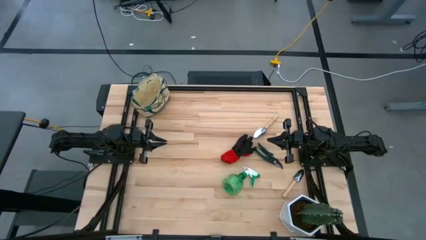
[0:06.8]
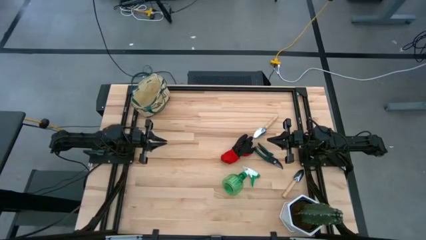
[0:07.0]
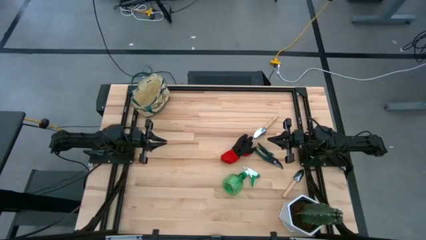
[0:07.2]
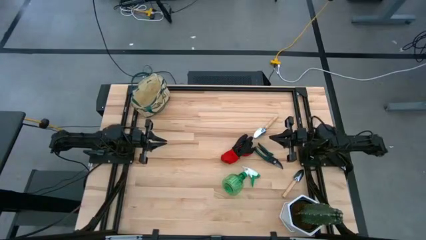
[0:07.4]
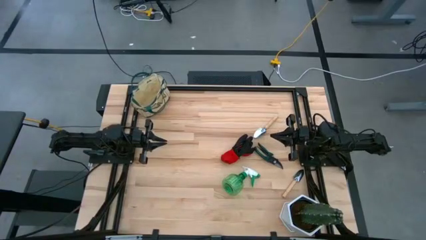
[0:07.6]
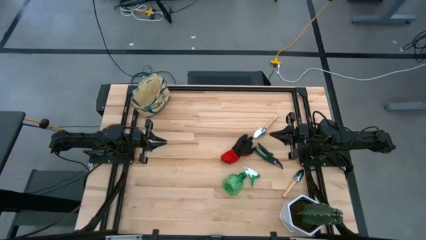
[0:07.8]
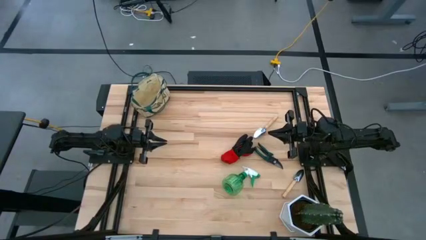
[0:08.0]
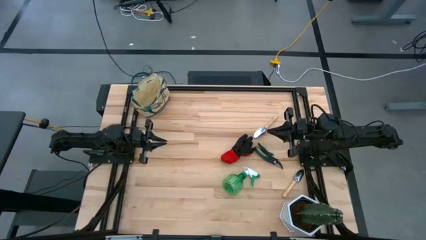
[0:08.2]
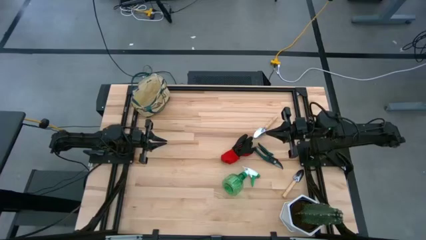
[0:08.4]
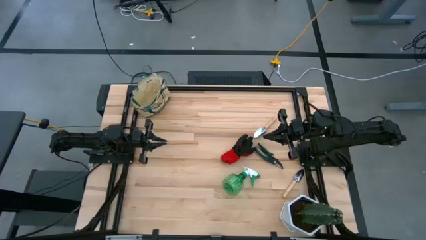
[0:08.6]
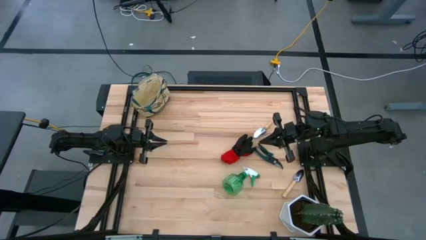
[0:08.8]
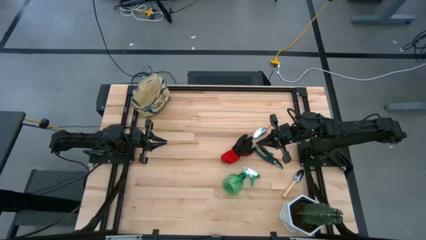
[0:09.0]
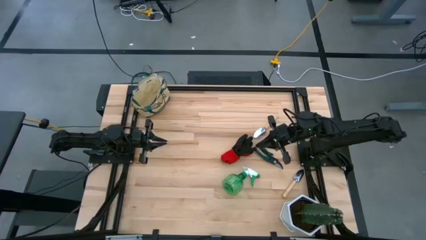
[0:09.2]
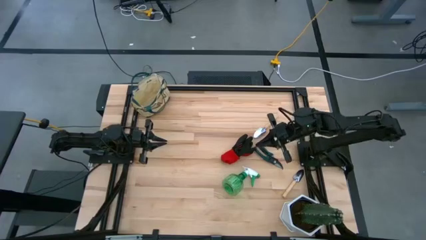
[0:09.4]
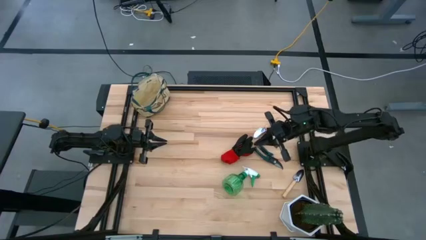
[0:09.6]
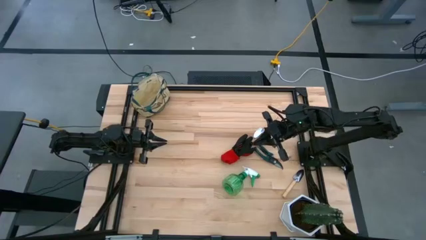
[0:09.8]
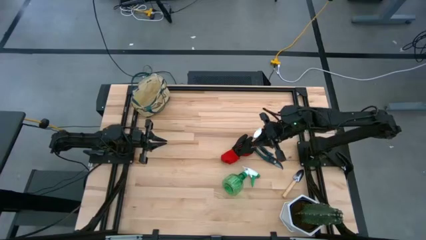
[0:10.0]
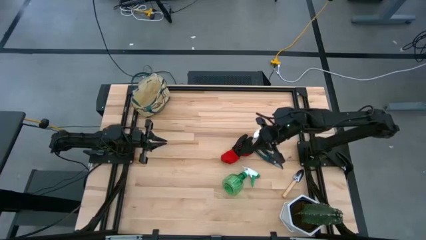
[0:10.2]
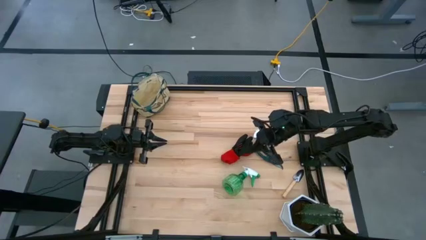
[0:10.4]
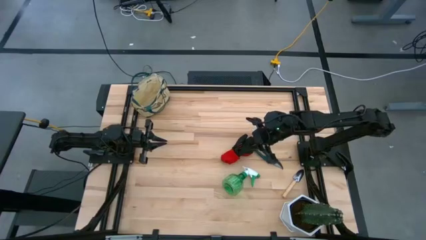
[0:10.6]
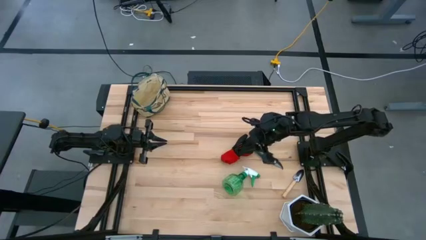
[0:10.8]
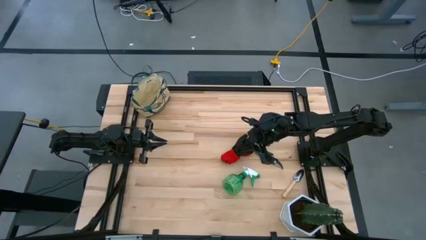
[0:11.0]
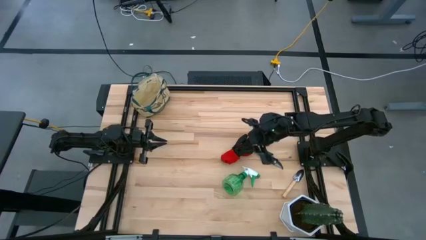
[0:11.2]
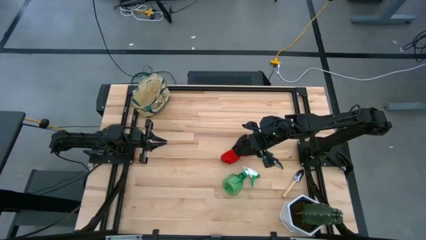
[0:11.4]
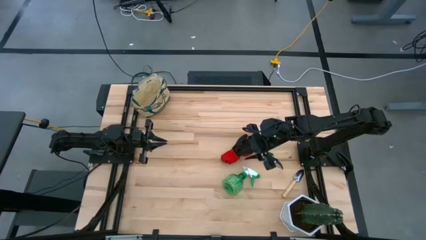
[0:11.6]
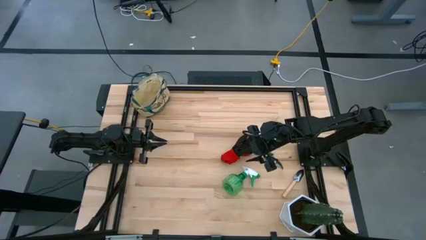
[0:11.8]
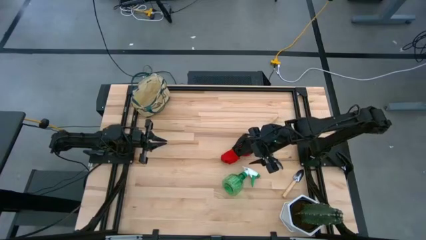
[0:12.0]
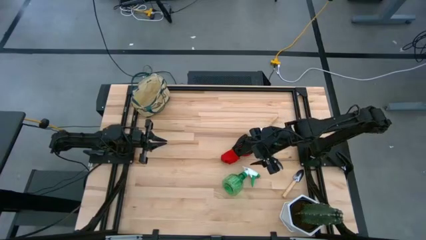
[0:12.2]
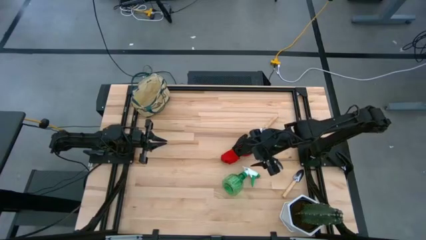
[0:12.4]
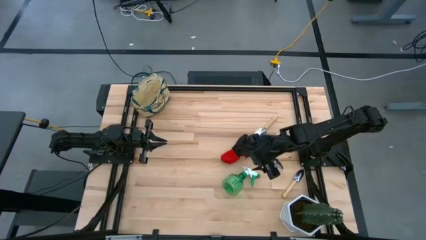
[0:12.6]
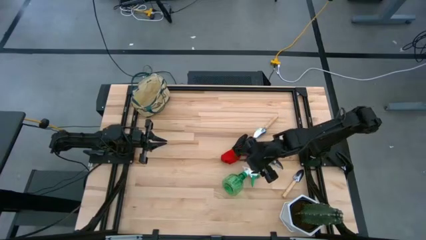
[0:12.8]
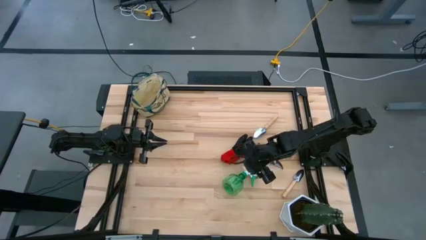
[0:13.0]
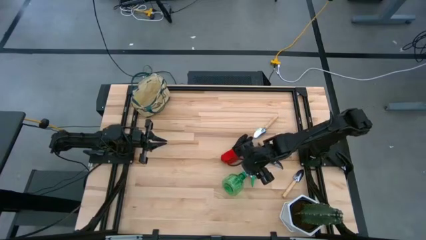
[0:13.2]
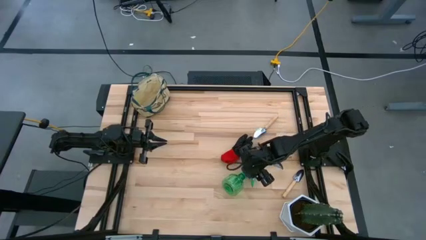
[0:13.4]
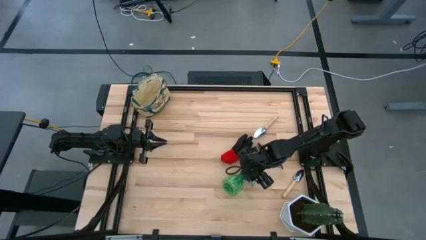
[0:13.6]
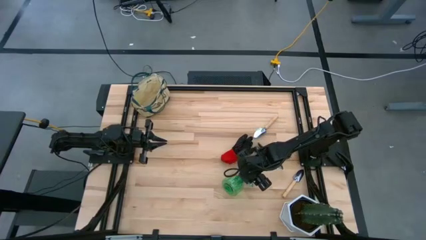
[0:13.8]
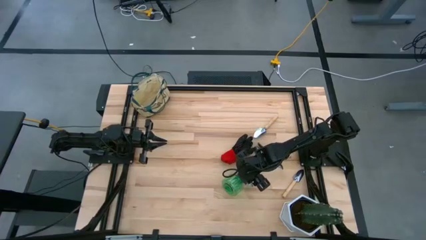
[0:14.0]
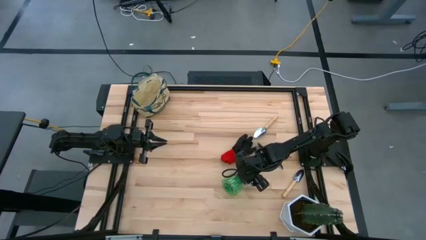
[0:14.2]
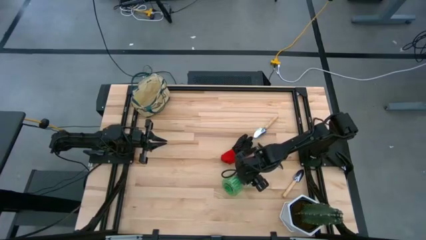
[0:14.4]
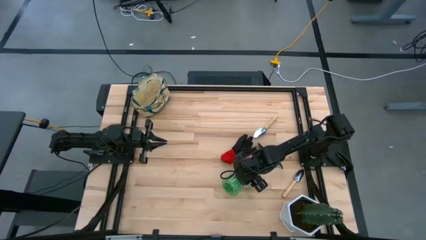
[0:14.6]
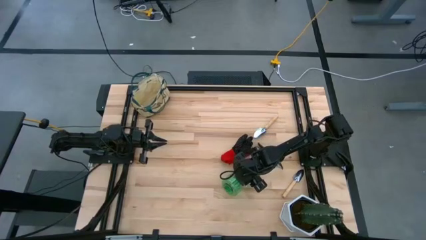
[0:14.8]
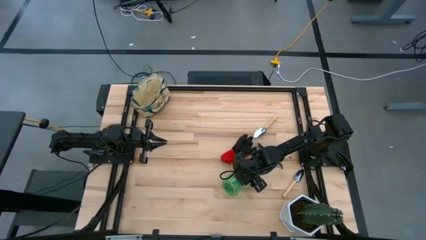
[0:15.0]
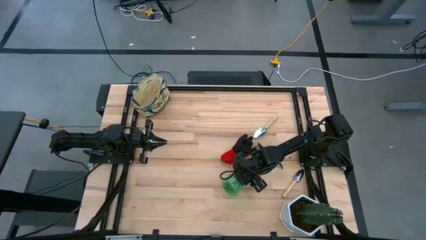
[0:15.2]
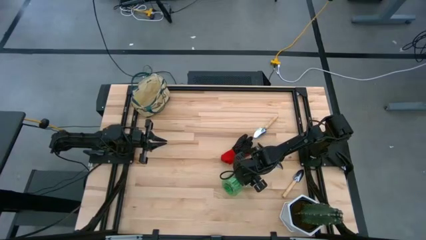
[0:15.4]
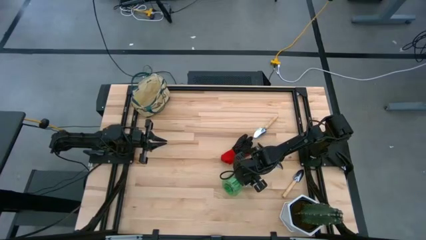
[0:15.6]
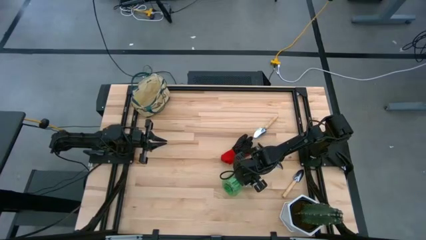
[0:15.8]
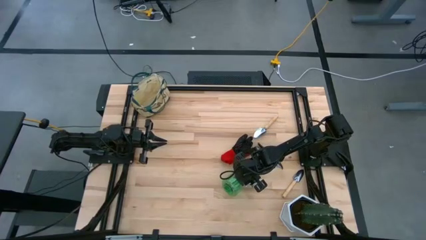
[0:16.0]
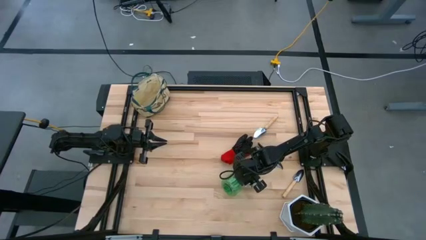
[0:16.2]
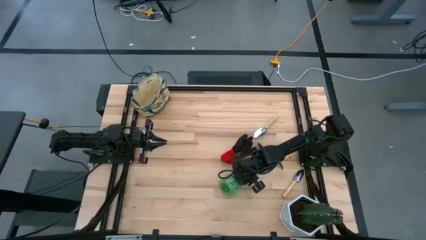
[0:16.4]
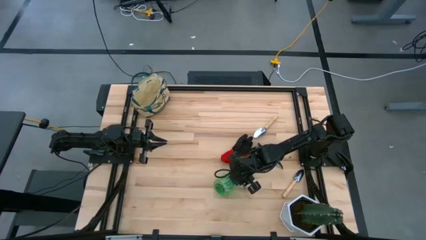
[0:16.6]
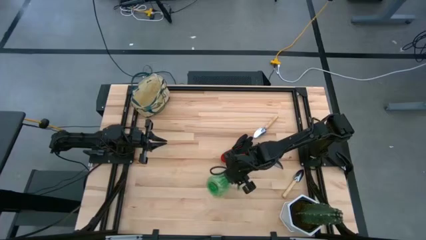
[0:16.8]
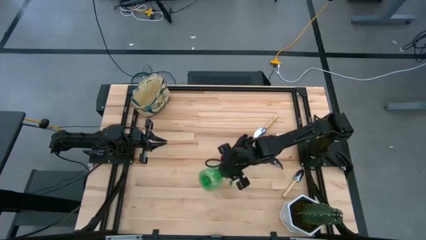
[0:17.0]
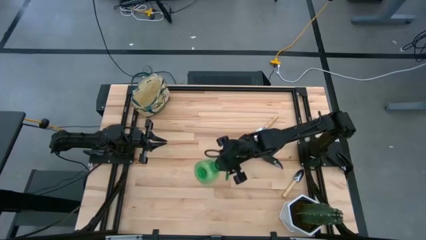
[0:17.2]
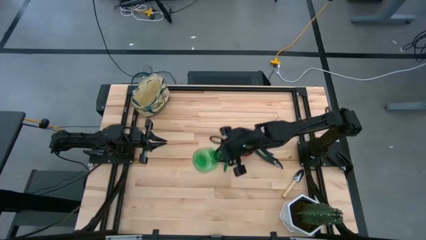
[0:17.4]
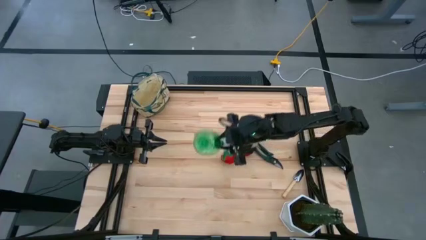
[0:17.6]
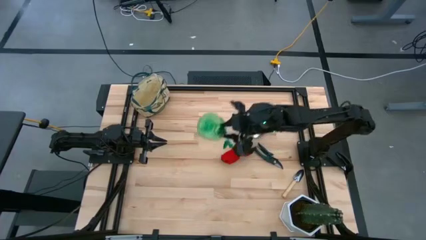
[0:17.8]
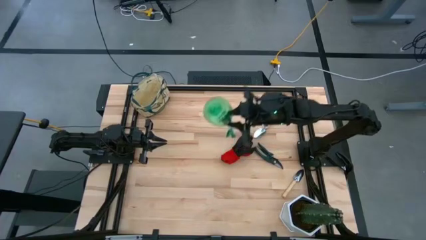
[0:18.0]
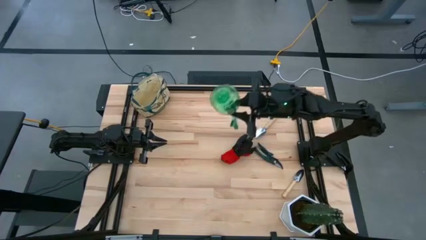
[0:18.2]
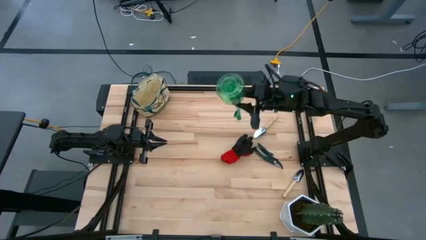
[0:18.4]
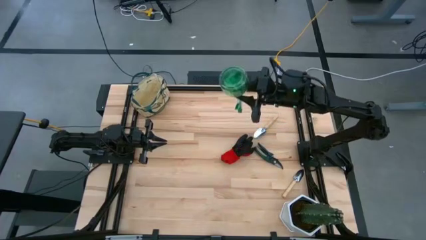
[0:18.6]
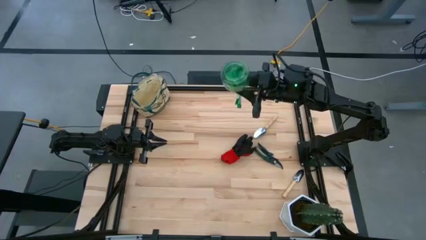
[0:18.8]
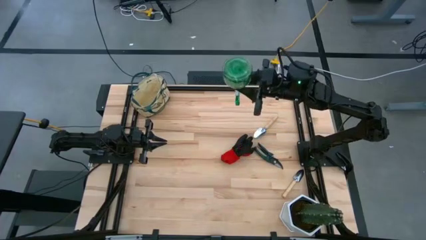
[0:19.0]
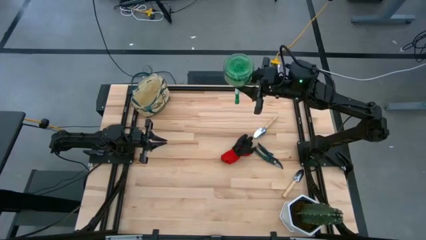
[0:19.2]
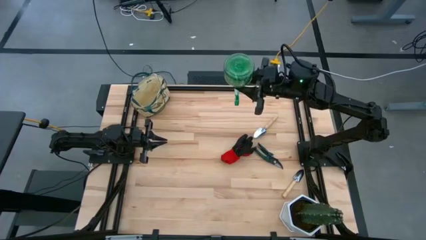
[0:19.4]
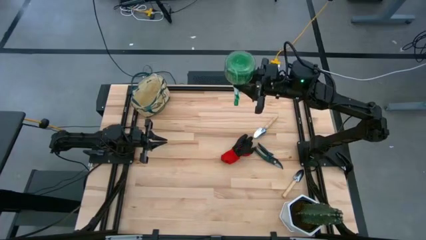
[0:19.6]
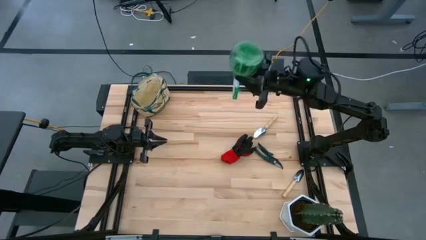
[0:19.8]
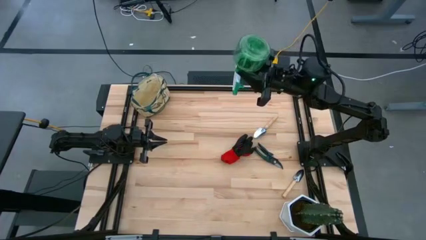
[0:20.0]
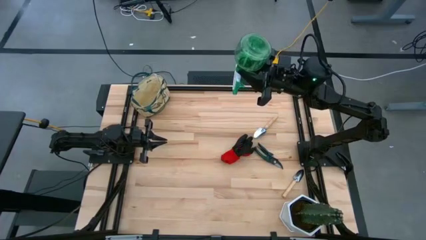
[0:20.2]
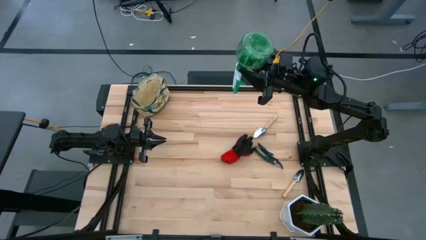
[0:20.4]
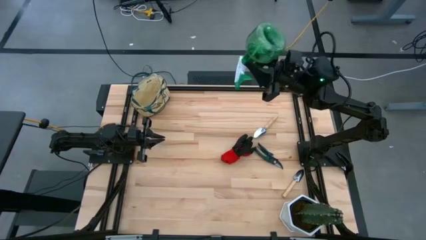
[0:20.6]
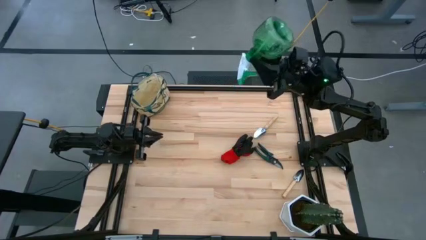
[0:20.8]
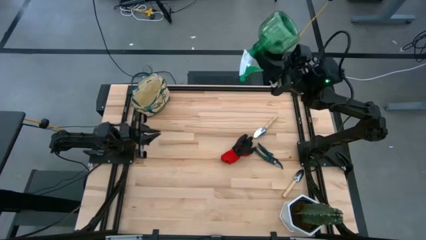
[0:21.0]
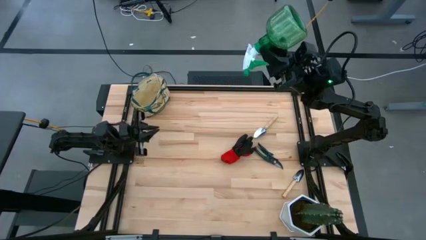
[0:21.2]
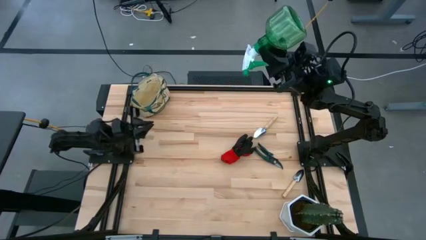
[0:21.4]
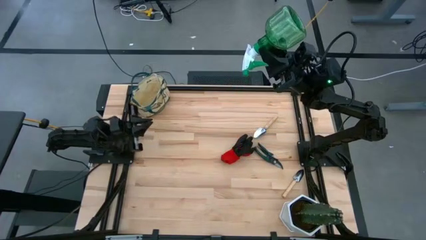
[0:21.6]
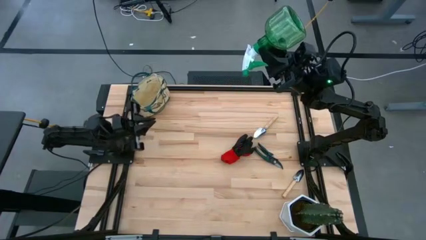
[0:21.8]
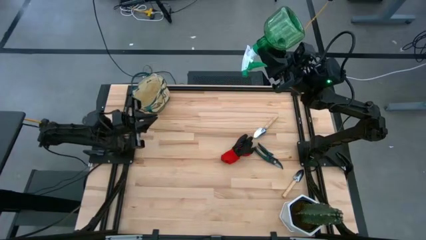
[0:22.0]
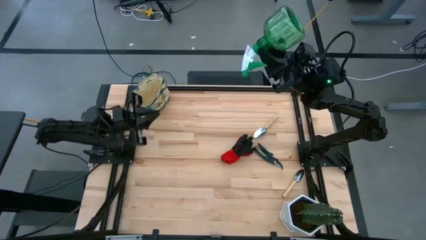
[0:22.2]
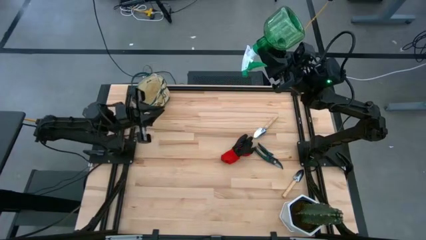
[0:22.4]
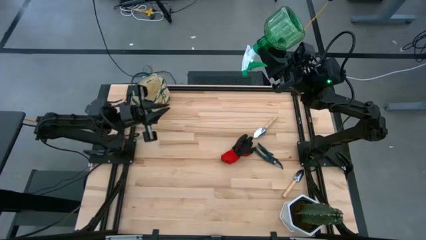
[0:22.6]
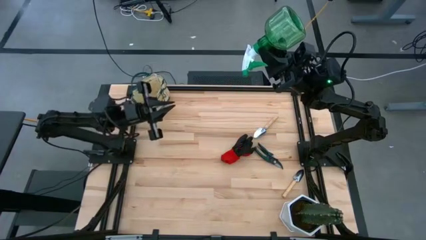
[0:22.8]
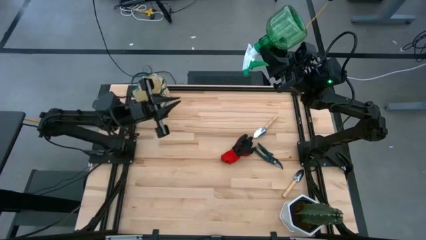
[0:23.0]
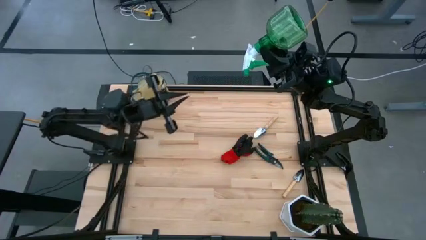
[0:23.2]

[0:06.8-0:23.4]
Task: Pick & Place Garden tools in Gardening bag
Put the green spray bottle into the gardening bag
